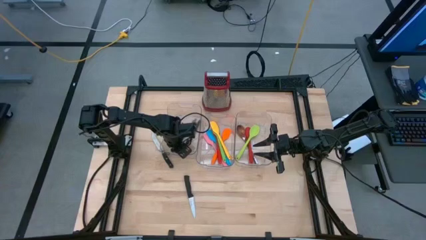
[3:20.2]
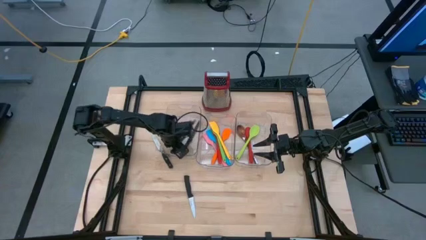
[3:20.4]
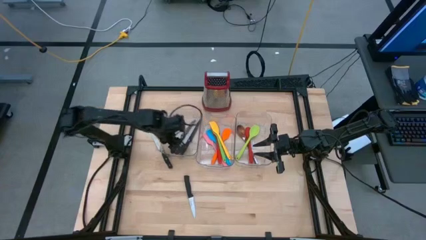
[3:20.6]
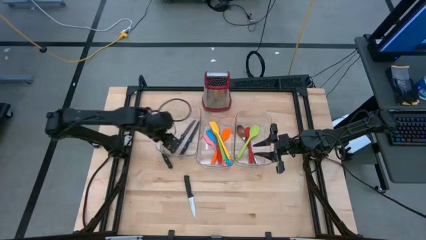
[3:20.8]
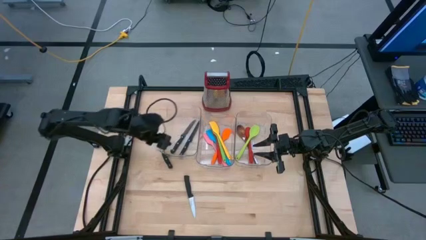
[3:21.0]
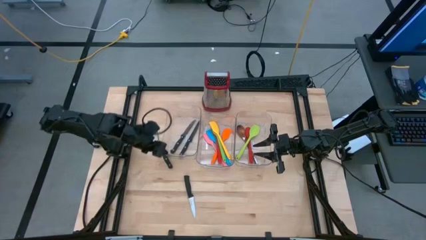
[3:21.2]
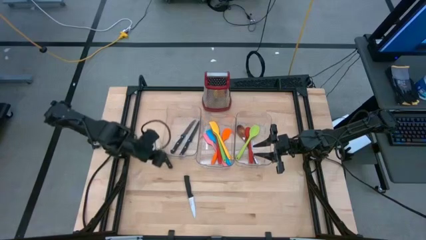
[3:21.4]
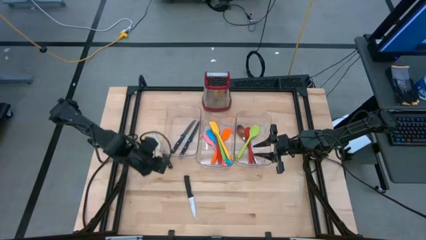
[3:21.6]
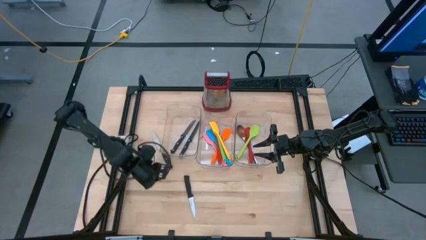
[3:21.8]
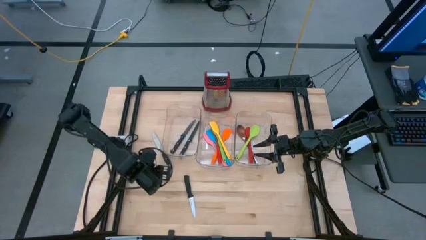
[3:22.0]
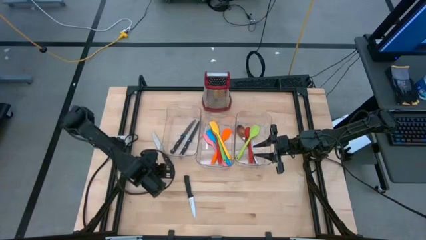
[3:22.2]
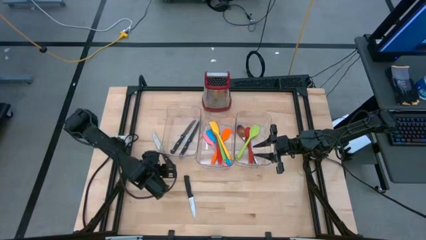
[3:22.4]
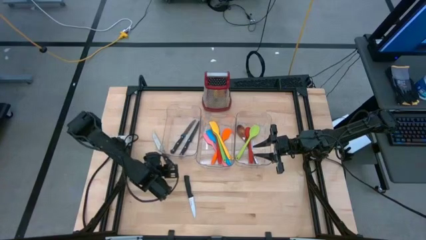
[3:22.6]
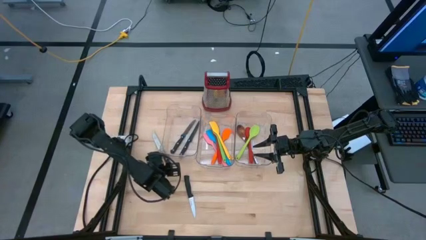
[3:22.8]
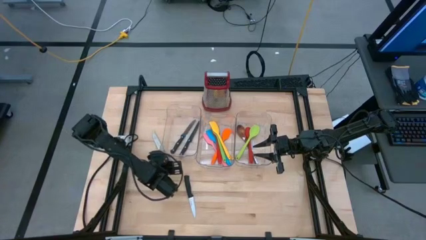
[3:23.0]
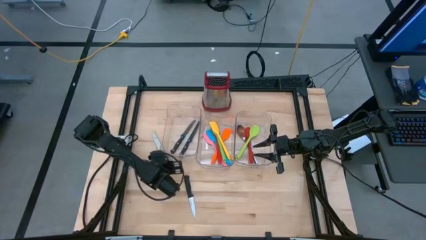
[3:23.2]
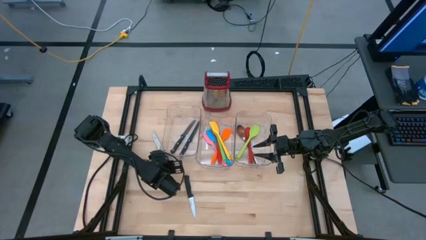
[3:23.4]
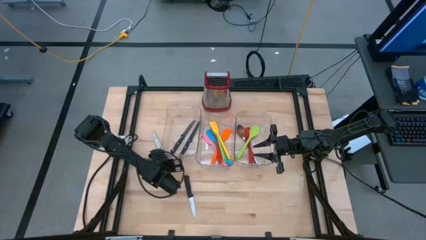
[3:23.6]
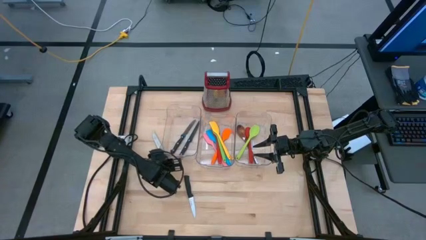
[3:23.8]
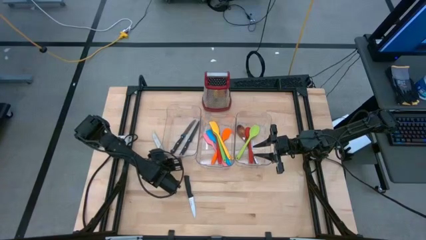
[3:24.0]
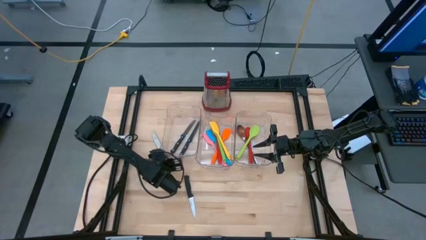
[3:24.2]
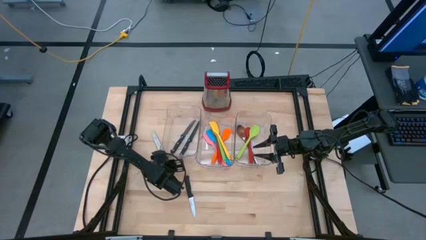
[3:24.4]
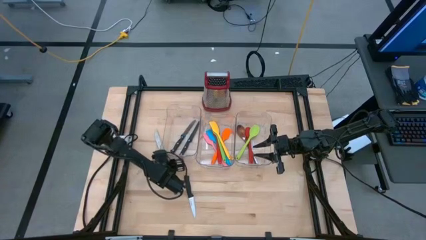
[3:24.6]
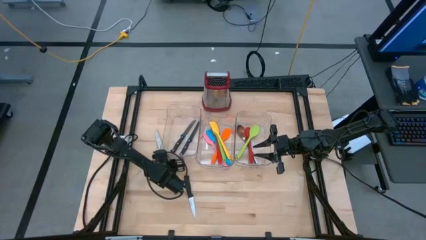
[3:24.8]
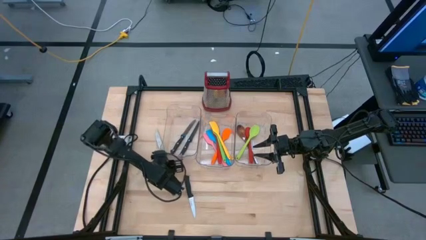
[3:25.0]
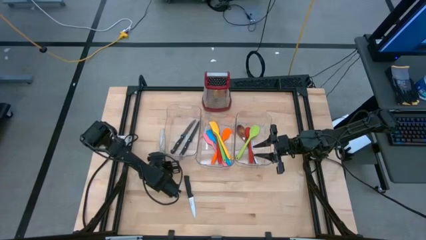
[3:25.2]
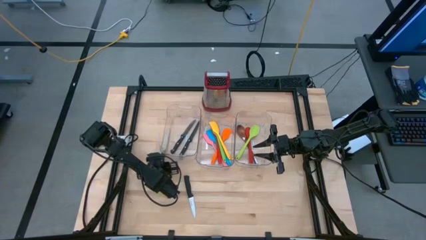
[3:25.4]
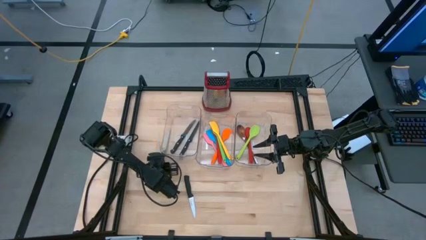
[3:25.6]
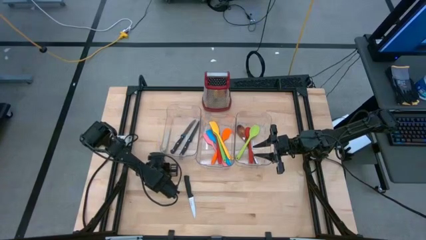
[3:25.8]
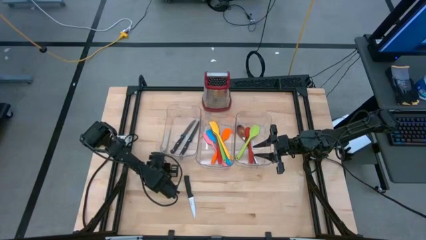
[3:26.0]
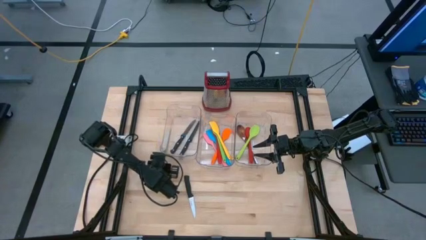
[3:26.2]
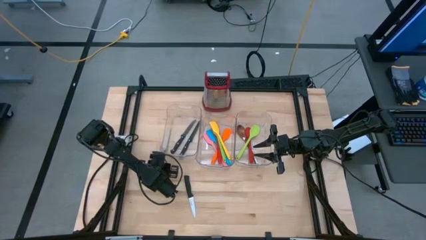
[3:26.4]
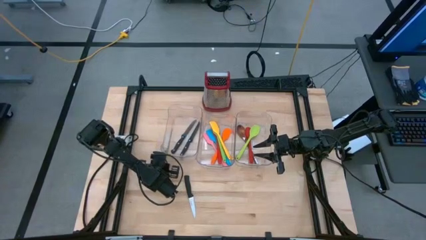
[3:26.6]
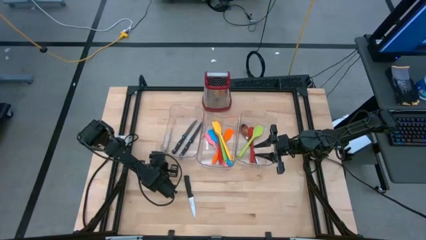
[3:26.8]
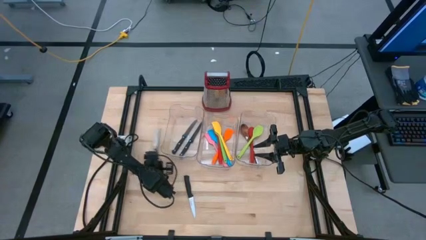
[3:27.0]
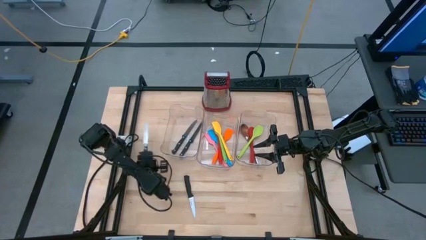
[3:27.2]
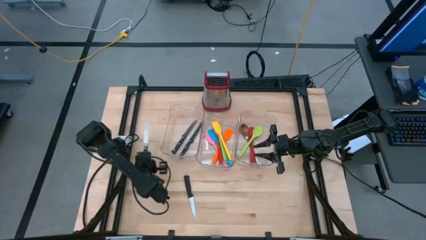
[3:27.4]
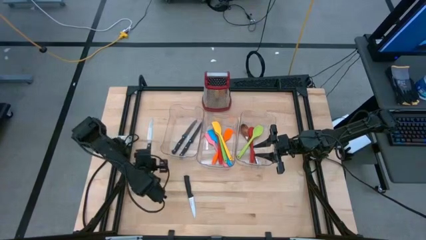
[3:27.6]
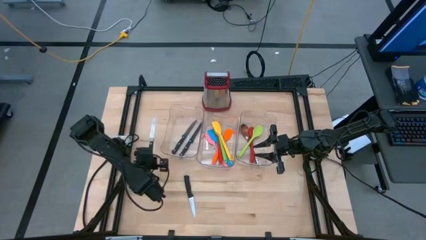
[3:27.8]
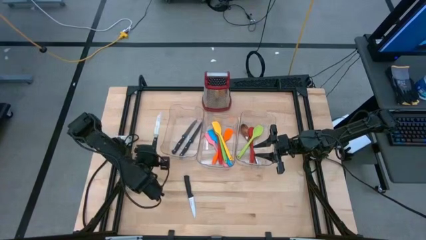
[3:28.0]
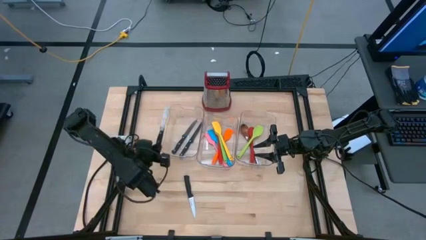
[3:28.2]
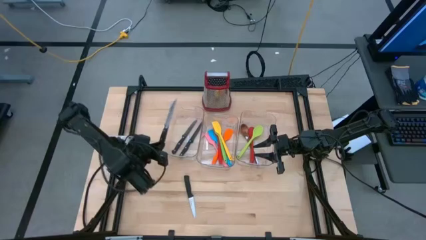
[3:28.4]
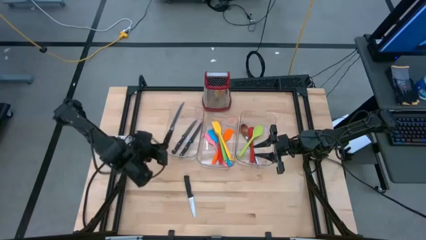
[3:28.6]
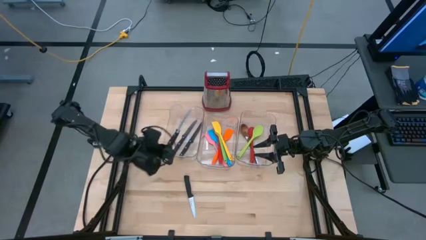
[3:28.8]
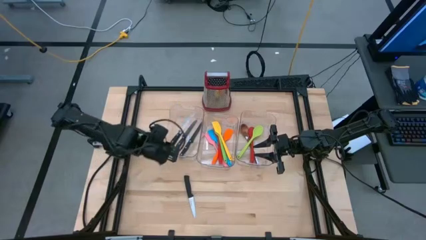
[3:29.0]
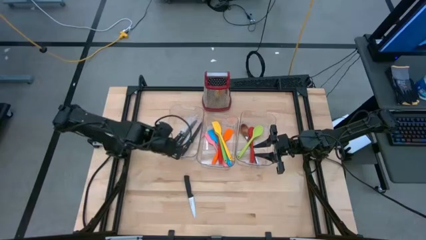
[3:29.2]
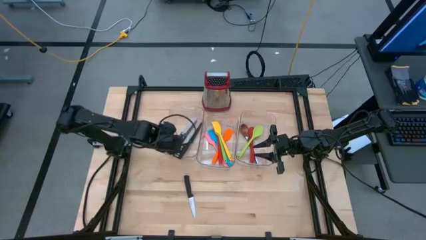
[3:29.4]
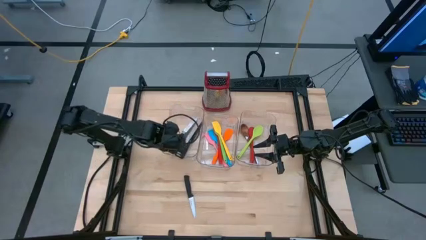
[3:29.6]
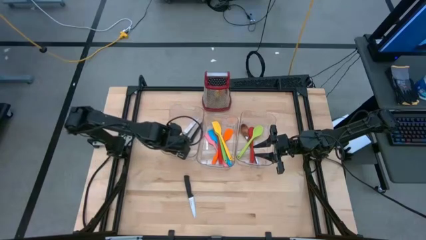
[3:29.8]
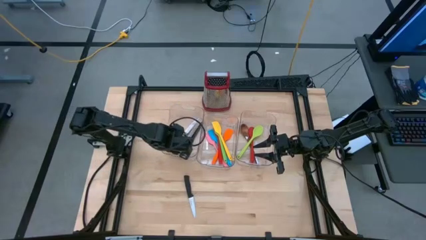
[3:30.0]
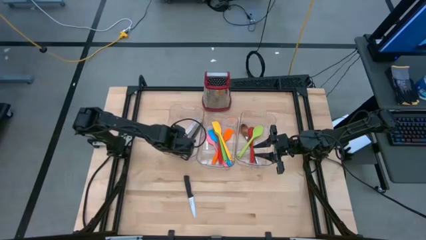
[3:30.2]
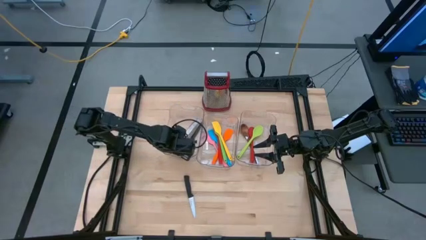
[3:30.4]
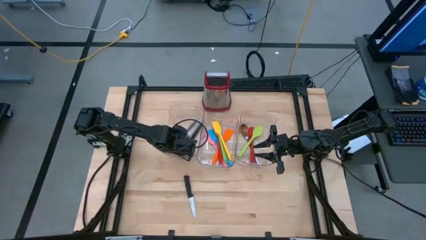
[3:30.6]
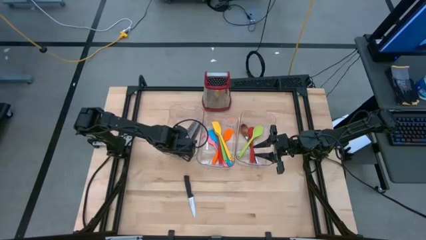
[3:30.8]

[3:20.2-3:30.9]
Task: Pick & Place Kitchen Items
Put the black knife into the left transparent bin

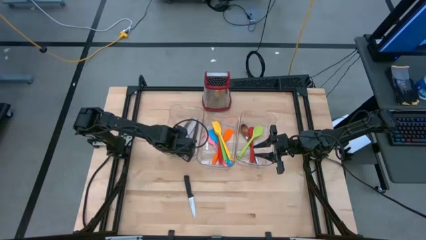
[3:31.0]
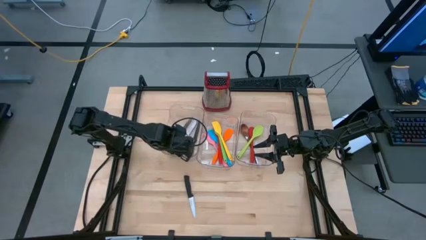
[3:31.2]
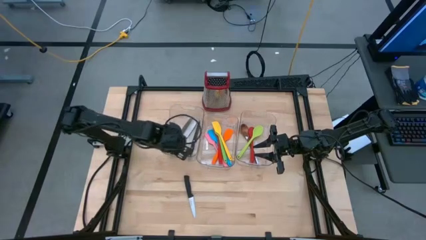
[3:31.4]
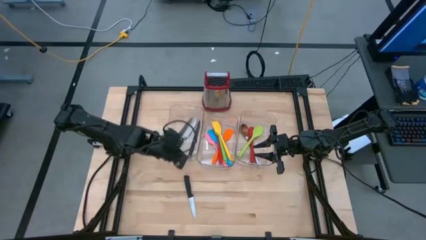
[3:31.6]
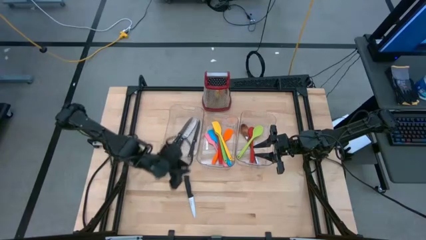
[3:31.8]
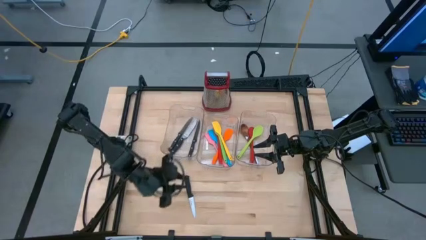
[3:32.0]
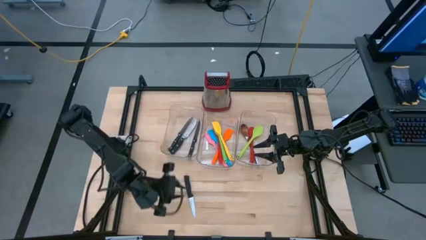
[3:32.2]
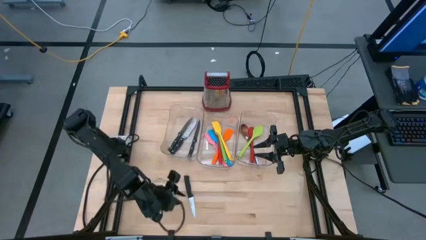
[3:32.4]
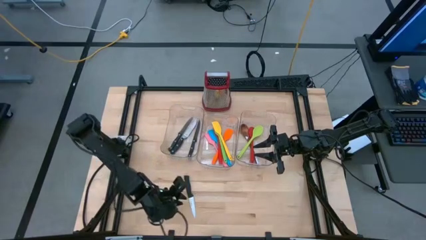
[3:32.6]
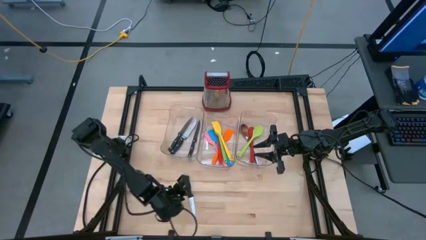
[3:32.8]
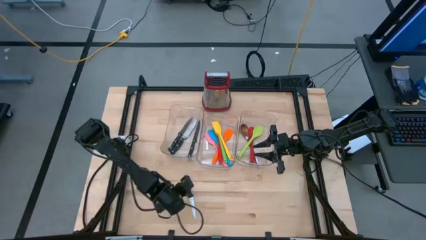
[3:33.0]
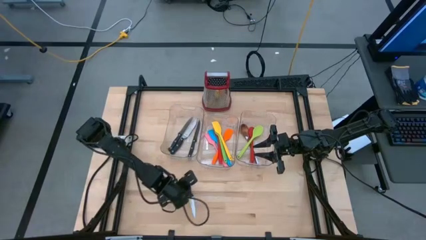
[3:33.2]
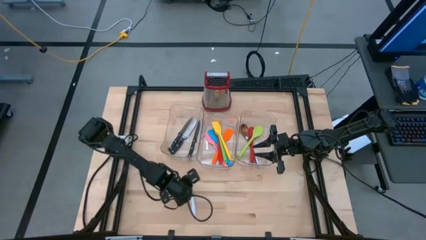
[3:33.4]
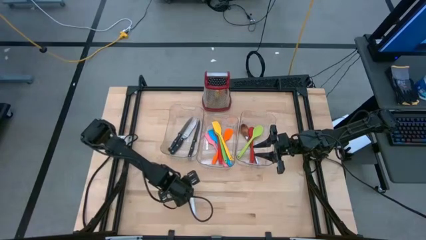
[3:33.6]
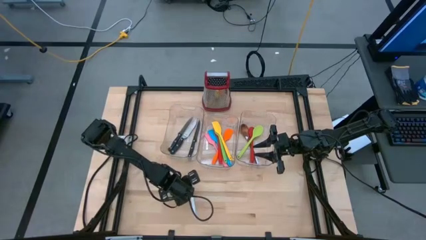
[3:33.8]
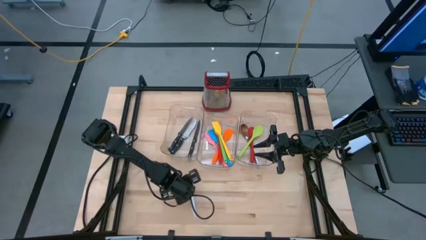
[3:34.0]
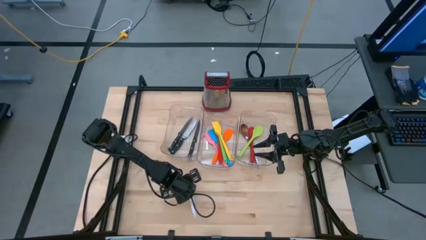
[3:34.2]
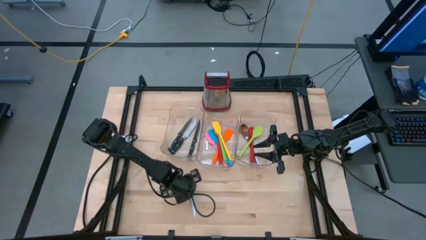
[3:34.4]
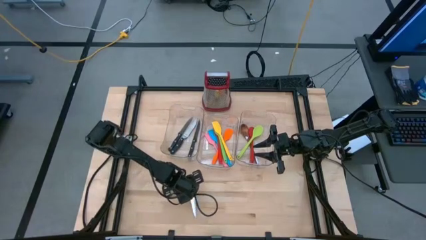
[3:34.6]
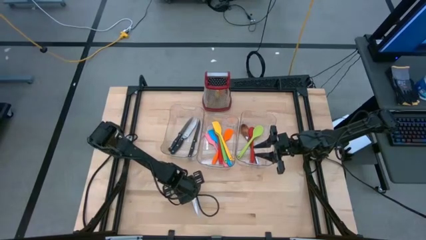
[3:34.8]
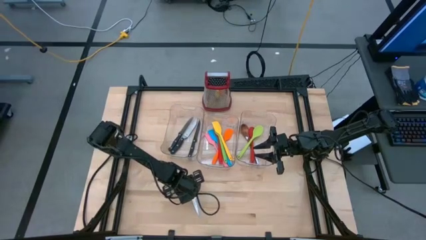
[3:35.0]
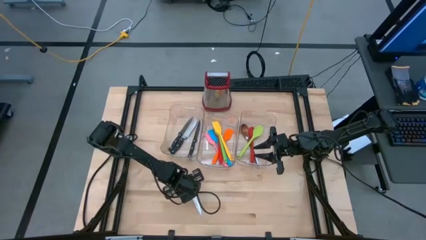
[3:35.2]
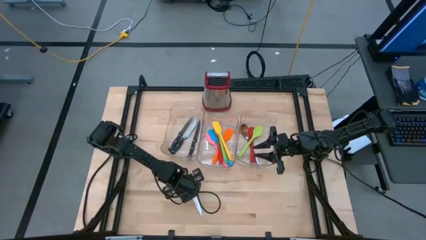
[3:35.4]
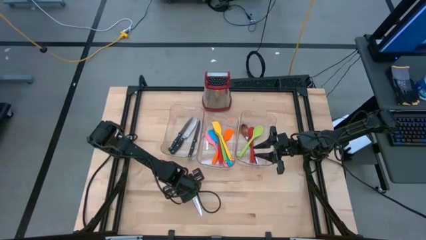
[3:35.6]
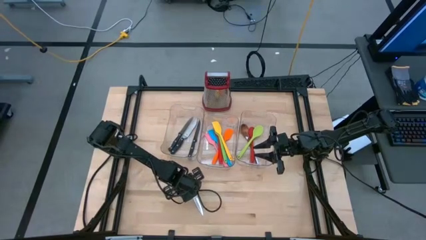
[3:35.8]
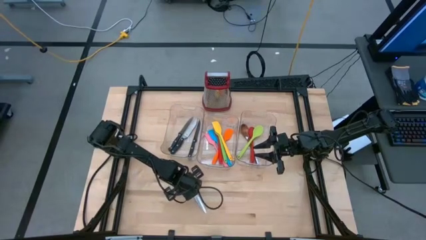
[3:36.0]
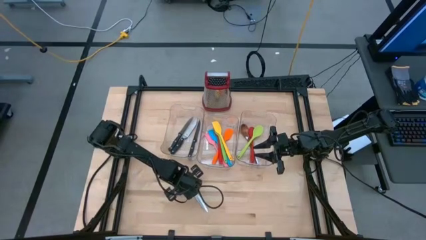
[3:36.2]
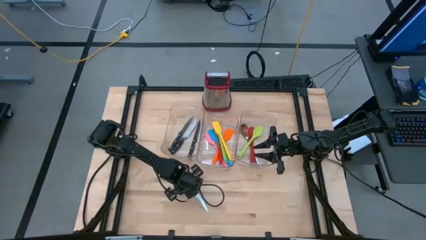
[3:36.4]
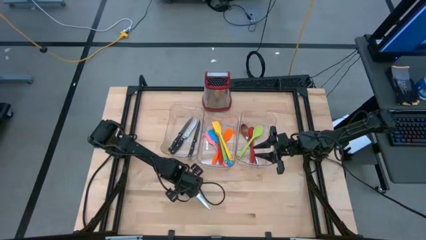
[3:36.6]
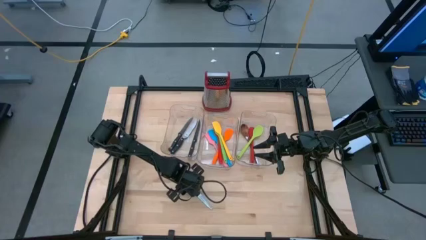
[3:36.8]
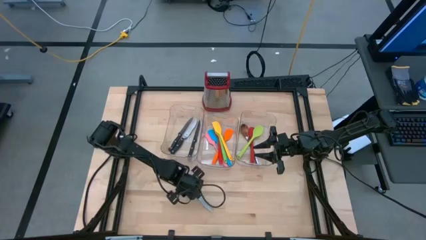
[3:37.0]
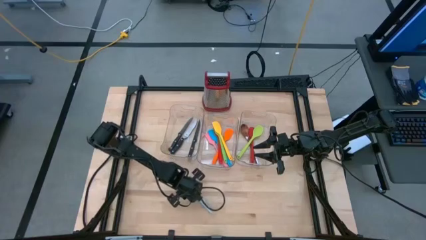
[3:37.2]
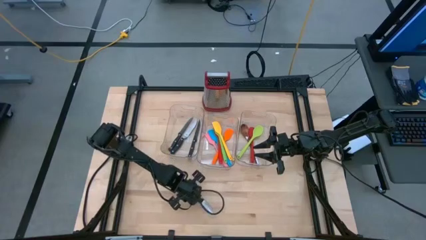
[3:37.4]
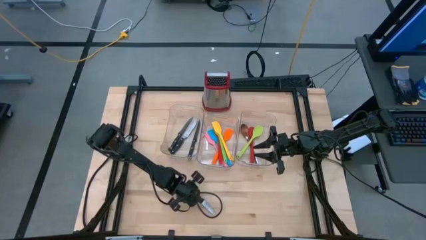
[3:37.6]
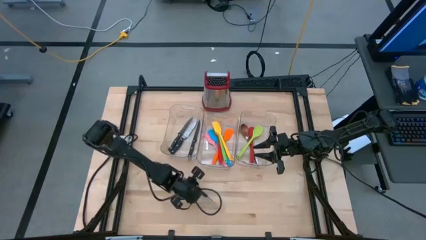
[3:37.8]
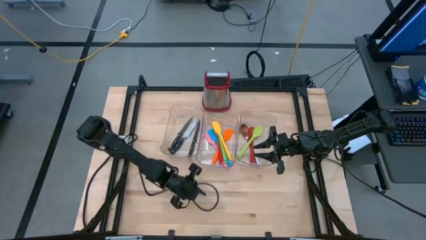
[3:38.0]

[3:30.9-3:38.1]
Put the black knife into the left transparent bin
